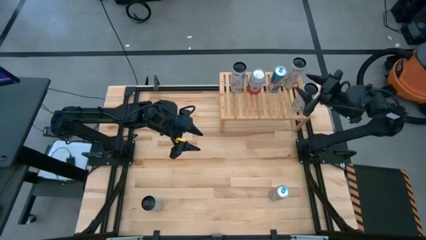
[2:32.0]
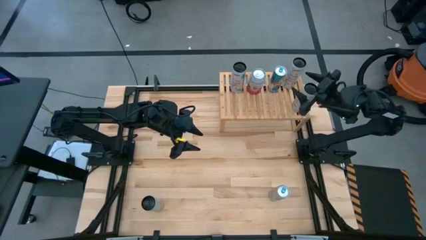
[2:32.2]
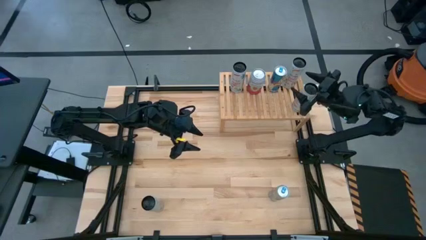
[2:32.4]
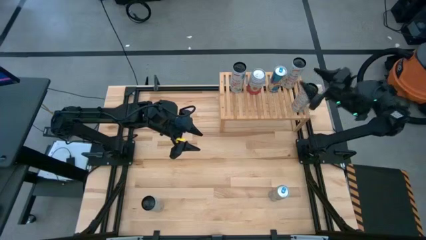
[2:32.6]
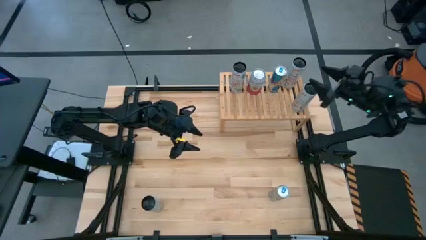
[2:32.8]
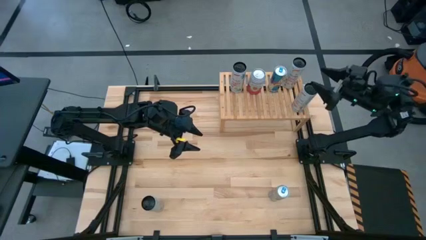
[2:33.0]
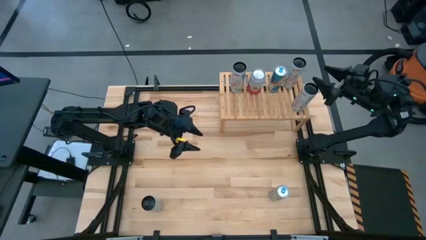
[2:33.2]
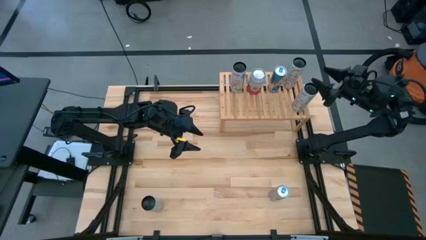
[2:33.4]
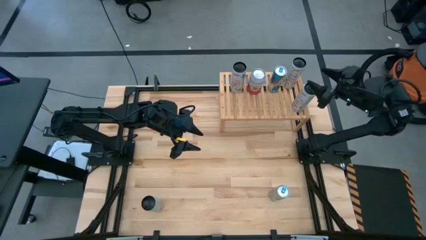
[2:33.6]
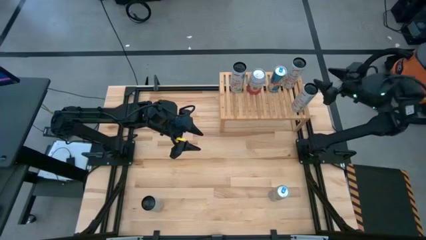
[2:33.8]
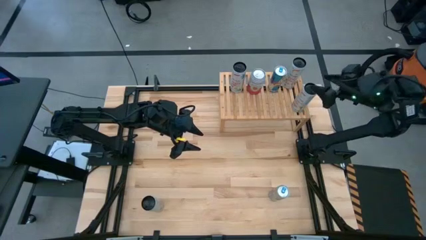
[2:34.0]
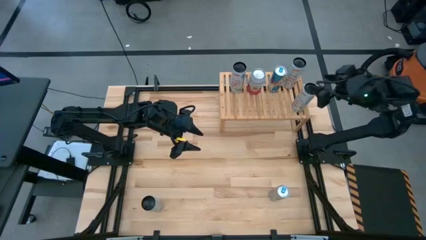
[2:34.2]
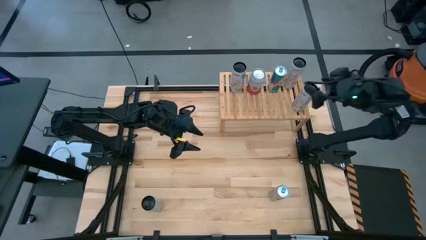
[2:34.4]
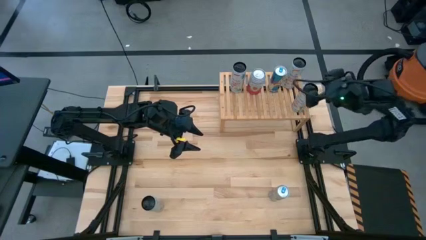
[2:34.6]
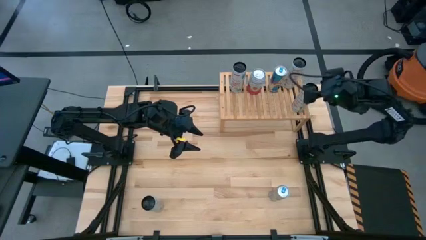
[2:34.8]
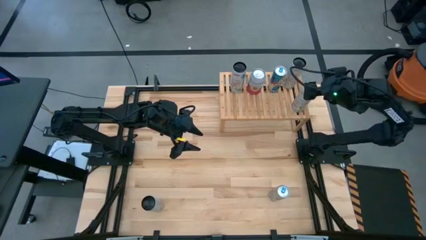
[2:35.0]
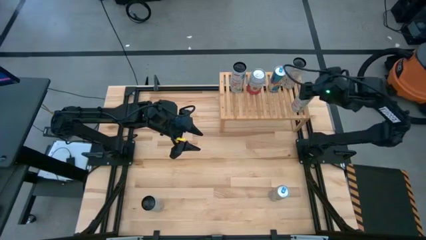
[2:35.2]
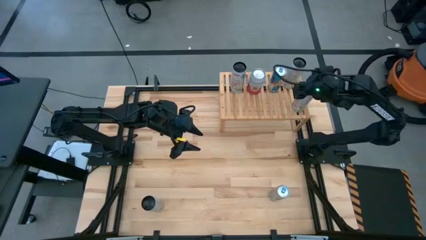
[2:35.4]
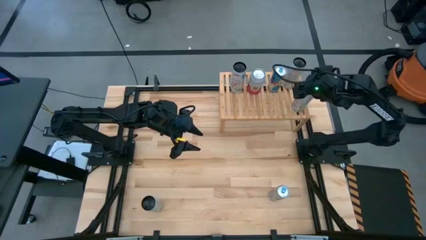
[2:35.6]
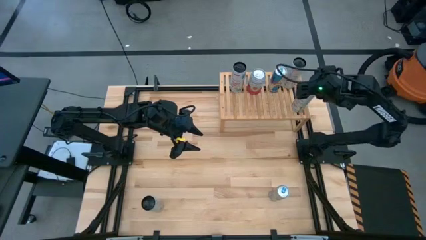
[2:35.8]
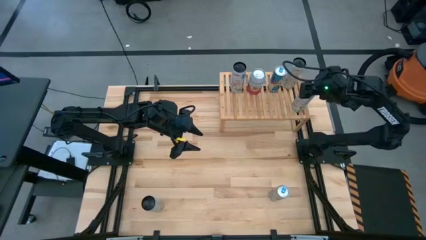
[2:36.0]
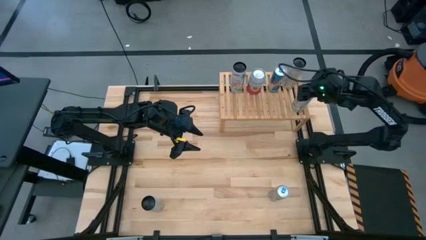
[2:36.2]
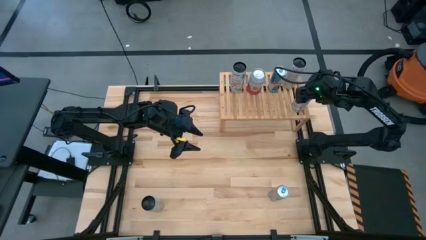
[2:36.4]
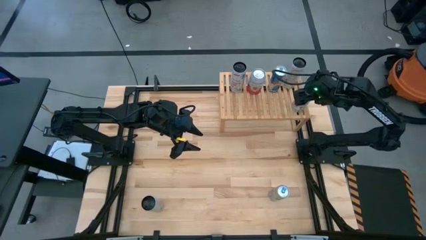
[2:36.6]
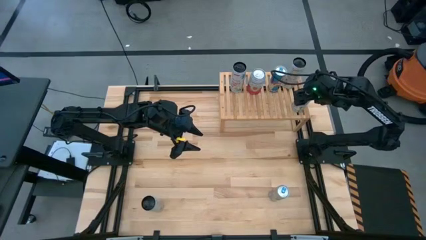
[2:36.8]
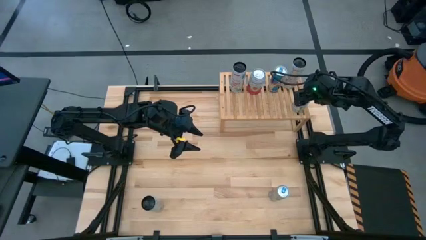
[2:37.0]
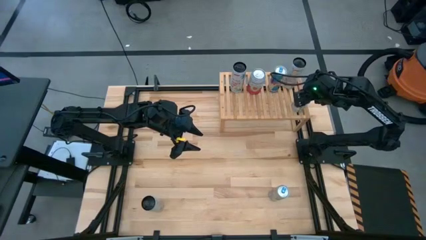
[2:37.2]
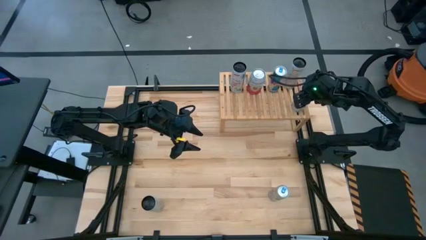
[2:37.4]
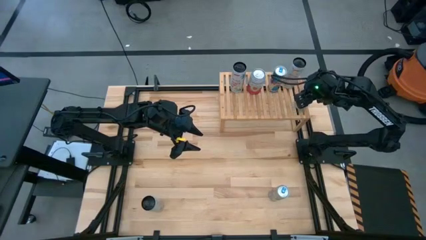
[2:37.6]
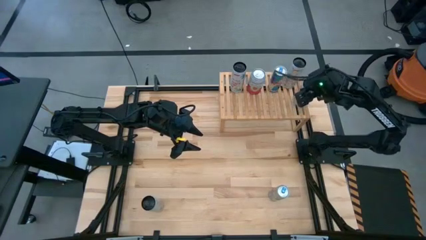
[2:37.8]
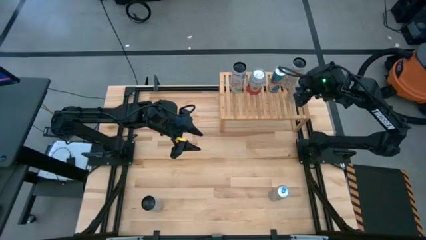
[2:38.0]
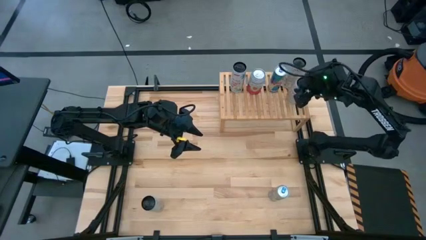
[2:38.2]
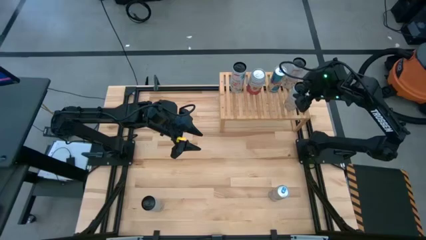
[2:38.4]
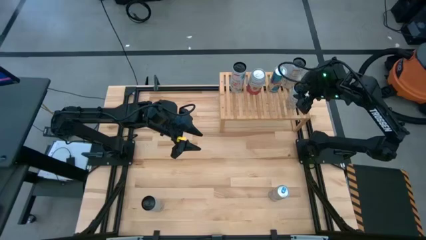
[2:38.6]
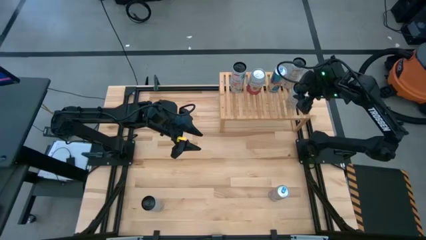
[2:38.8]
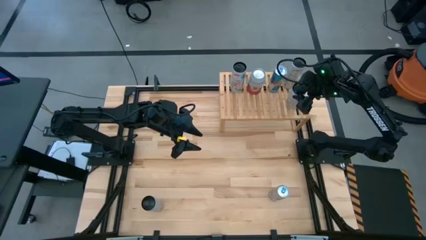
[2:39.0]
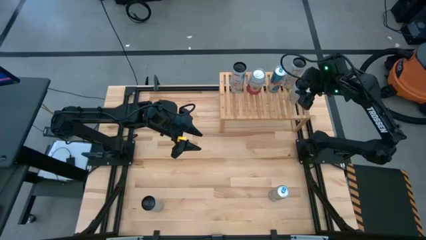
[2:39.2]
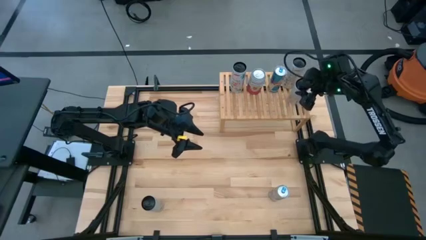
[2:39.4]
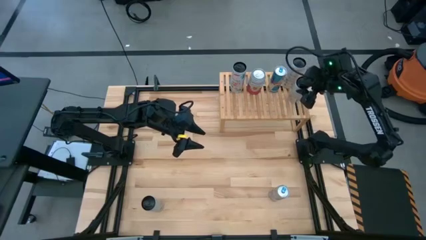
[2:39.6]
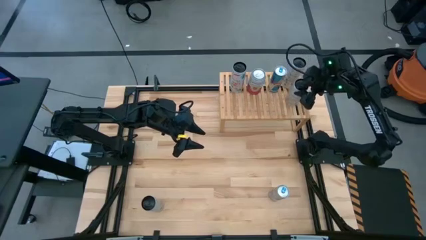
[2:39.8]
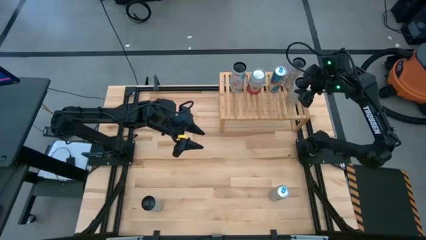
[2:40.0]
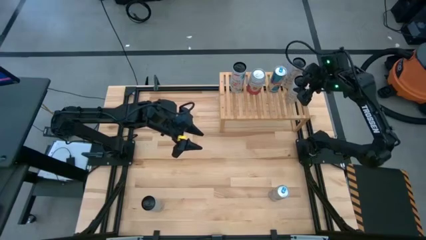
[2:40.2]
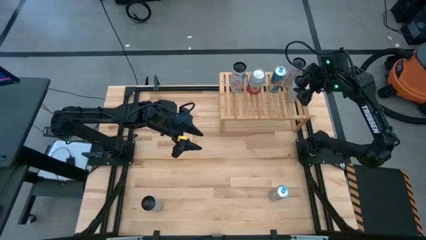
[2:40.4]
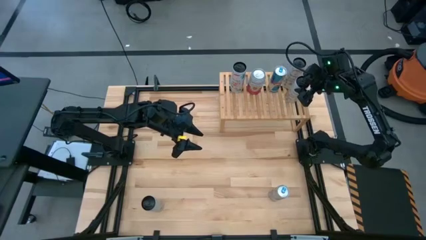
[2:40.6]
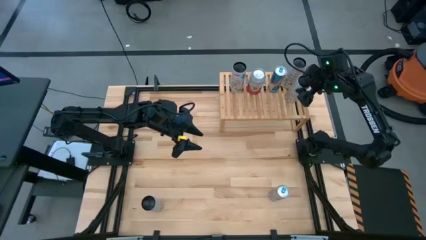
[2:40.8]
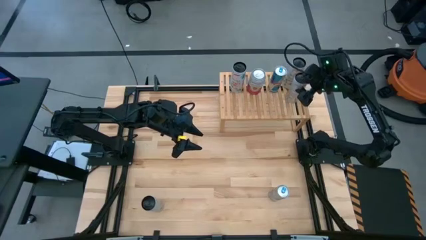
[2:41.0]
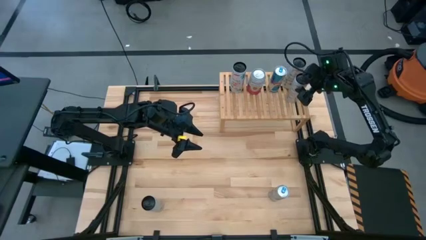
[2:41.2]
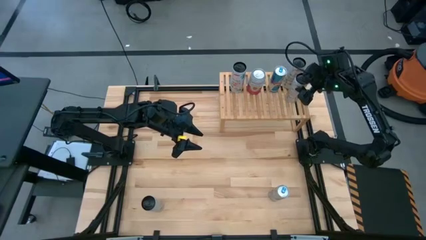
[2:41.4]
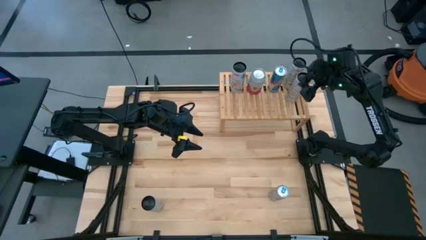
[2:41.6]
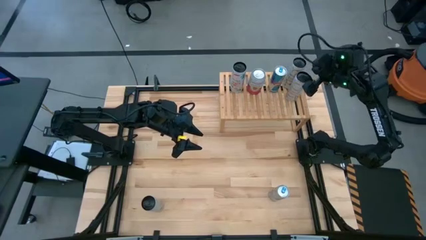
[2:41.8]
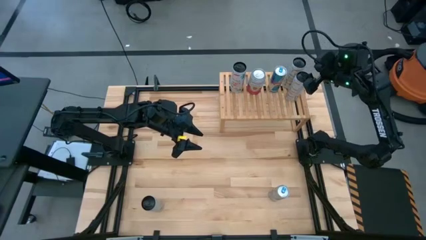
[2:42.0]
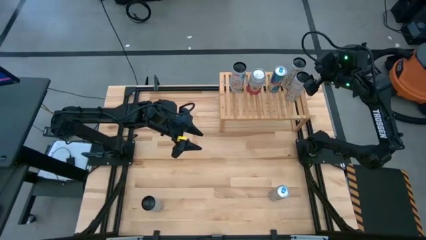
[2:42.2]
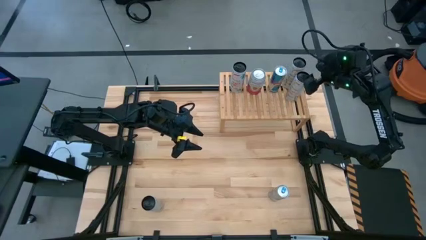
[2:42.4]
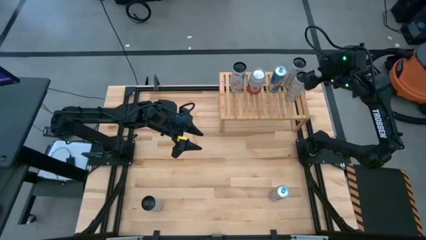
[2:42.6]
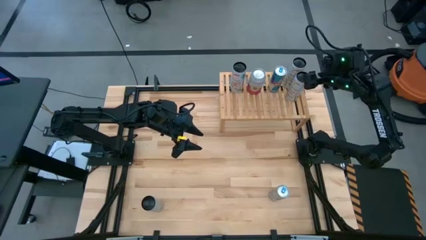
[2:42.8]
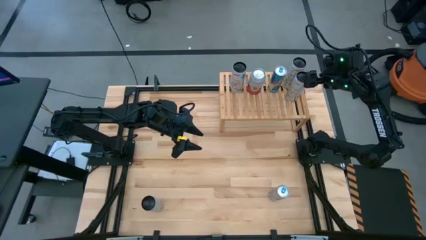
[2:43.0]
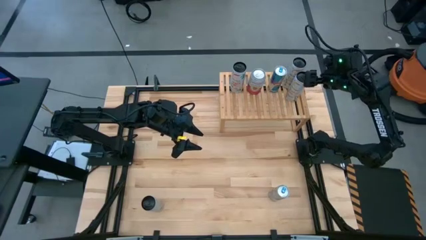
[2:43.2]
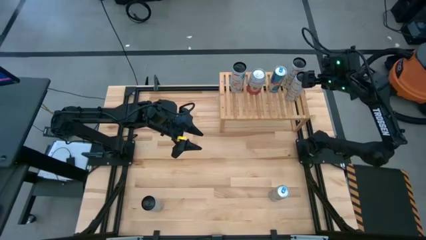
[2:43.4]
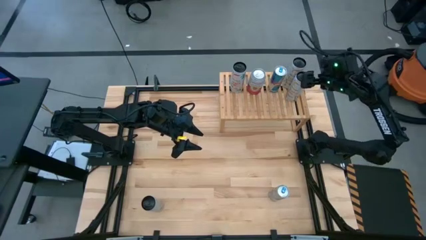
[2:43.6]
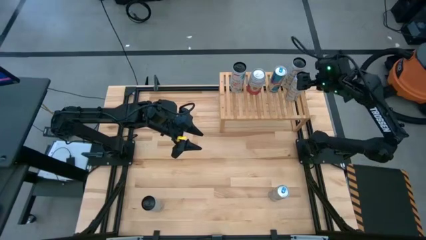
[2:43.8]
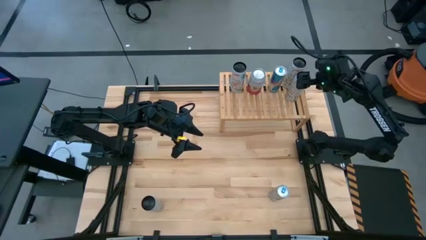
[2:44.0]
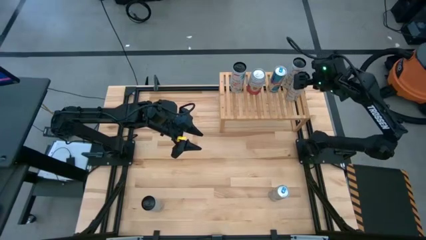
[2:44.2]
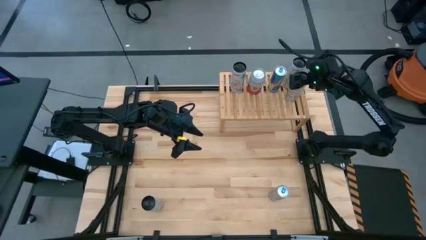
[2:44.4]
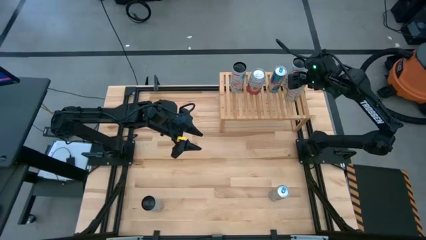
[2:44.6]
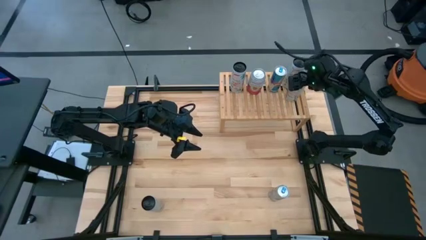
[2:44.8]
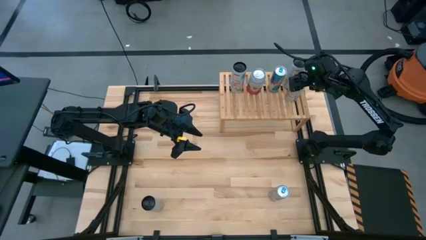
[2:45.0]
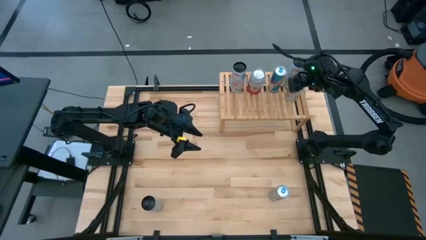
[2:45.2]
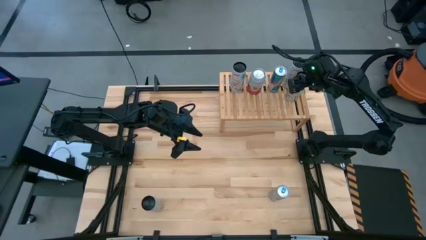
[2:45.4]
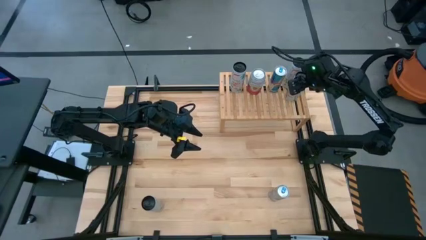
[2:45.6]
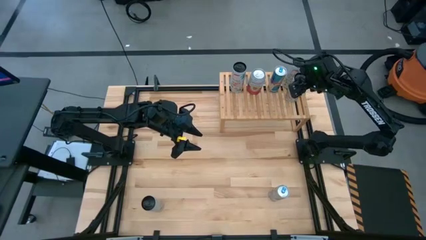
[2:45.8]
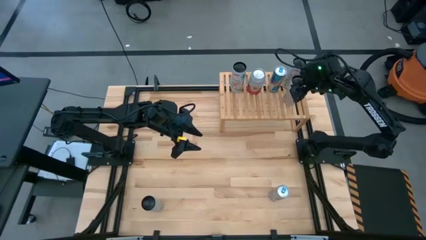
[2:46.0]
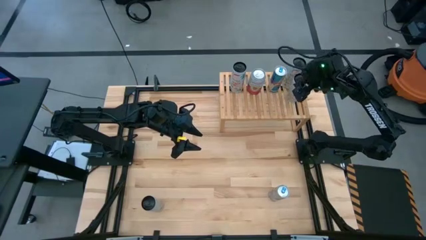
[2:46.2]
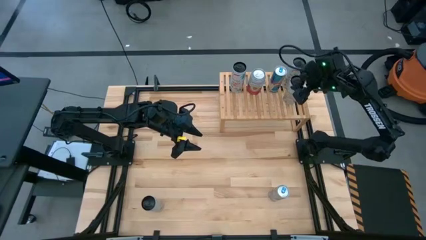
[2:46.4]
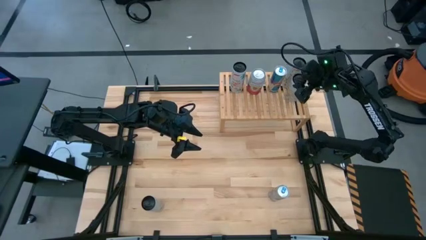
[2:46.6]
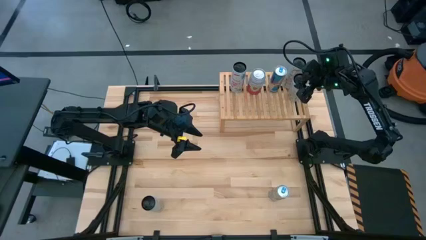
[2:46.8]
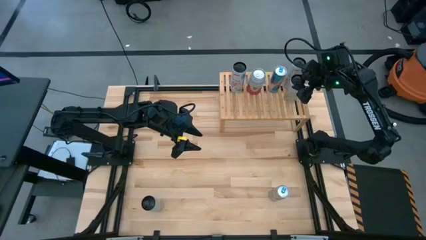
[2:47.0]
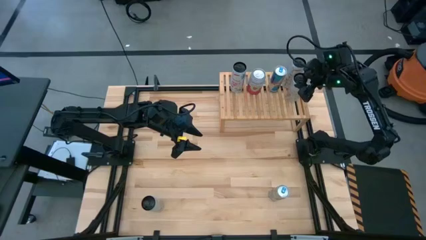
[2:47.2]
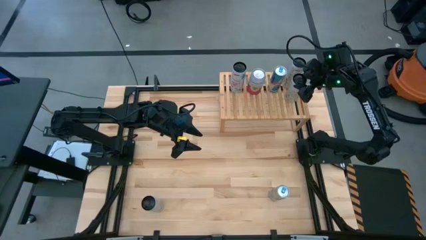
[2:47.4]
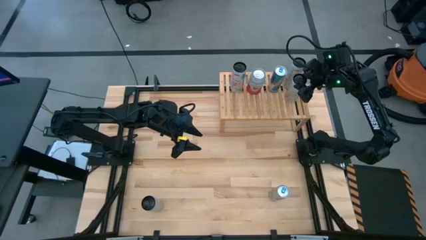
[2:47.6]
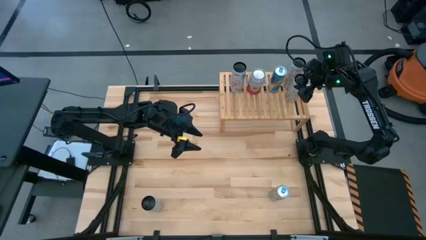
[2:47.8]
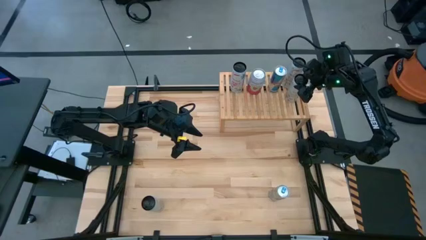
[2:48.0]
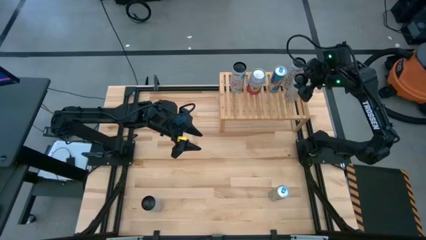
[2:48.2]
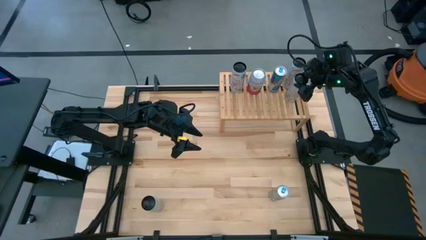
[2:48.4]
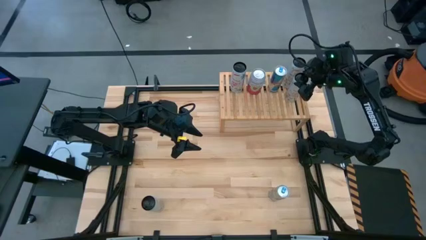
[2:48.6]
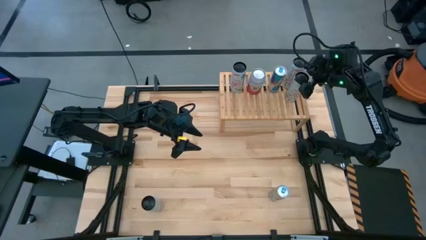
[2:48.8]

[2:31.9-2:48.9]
Task: Place canned beverage on shelf
Put the top white-yellow soda can on the shelf aligned with the other white-yellow soda can
